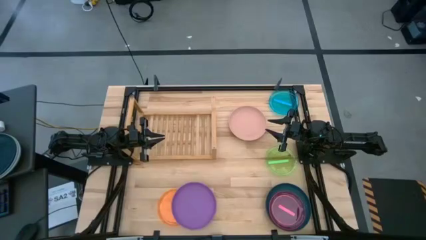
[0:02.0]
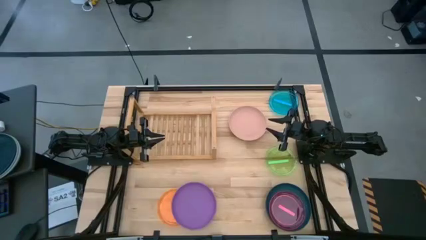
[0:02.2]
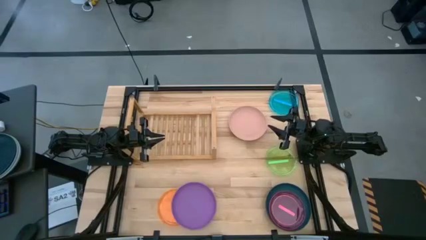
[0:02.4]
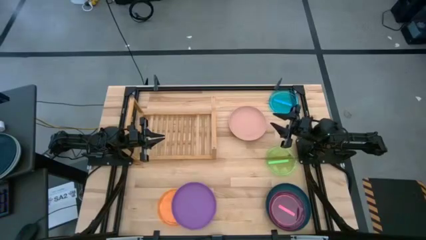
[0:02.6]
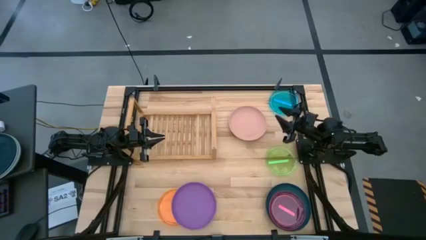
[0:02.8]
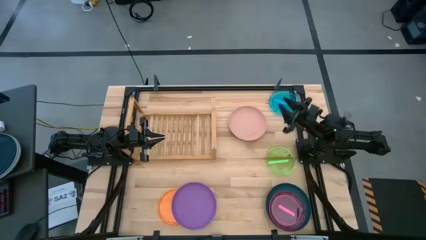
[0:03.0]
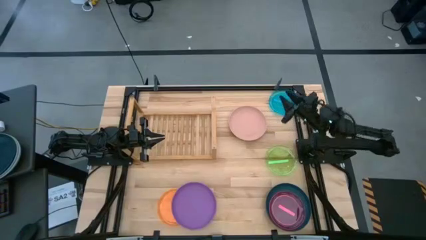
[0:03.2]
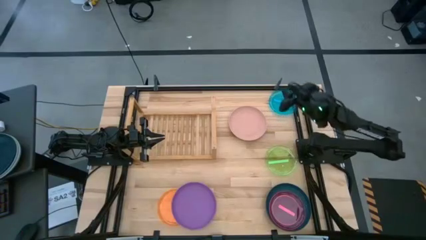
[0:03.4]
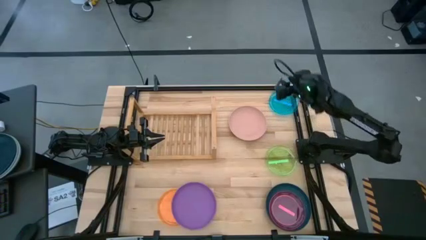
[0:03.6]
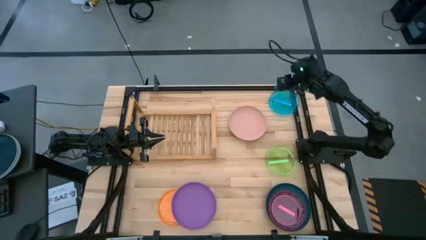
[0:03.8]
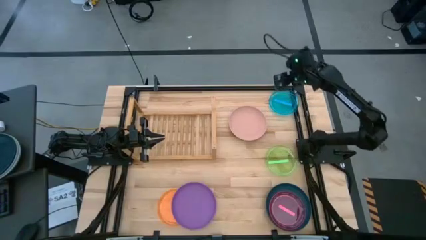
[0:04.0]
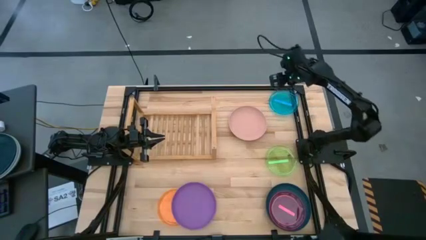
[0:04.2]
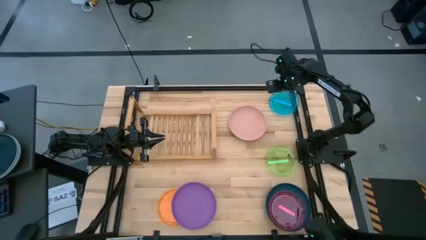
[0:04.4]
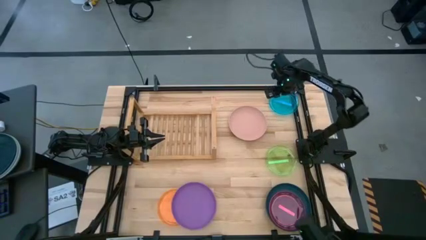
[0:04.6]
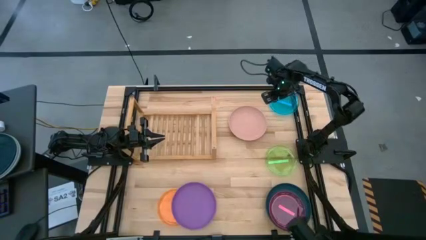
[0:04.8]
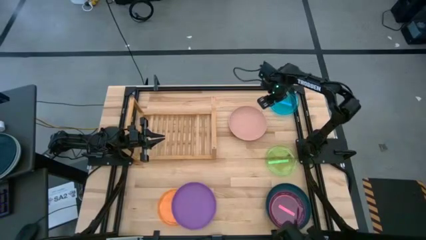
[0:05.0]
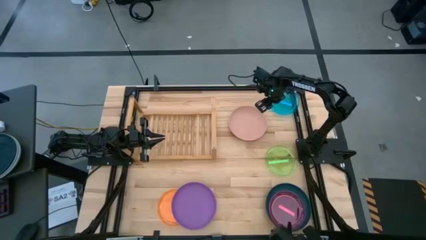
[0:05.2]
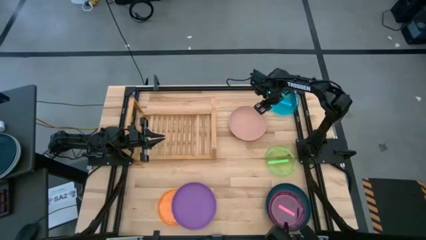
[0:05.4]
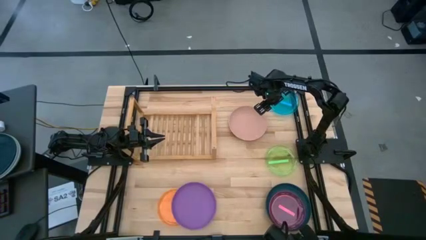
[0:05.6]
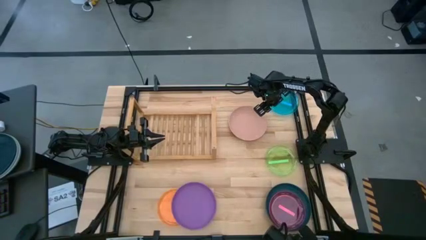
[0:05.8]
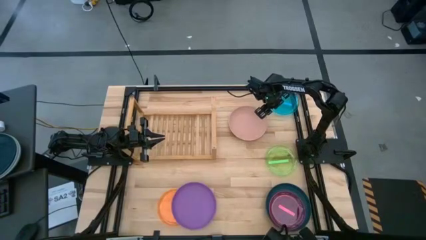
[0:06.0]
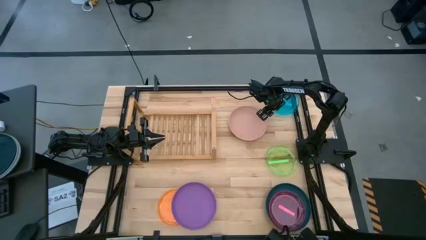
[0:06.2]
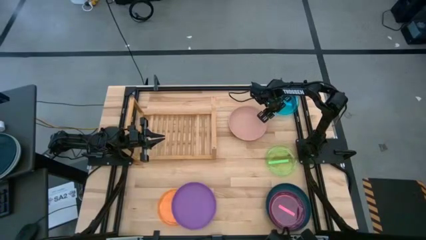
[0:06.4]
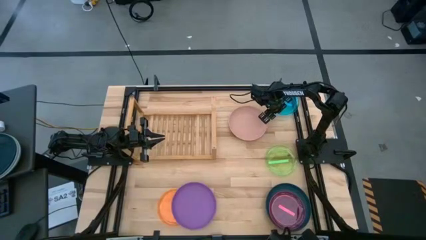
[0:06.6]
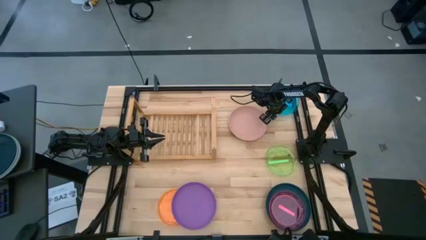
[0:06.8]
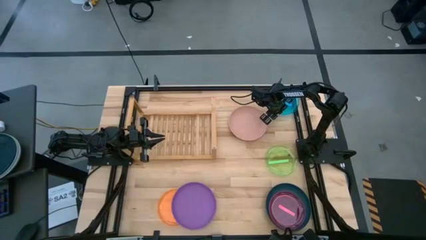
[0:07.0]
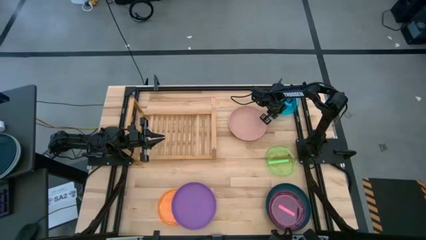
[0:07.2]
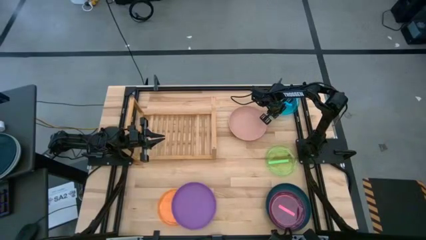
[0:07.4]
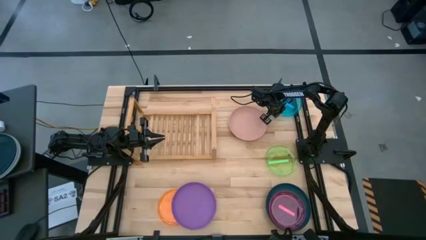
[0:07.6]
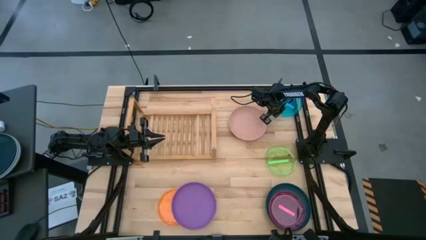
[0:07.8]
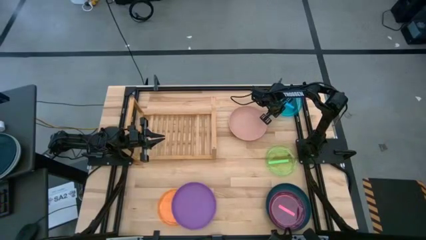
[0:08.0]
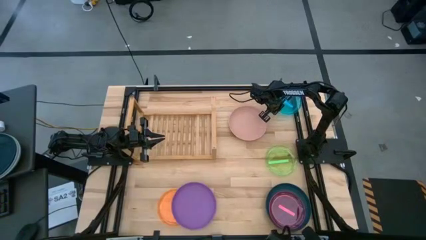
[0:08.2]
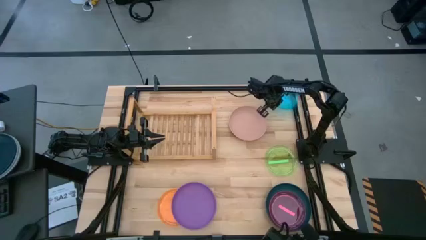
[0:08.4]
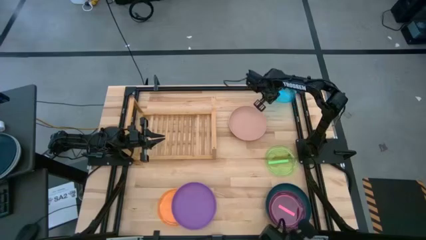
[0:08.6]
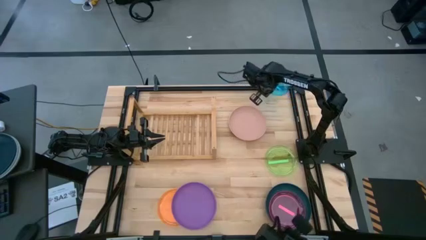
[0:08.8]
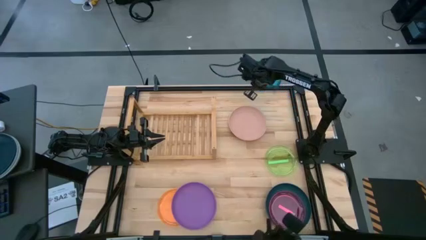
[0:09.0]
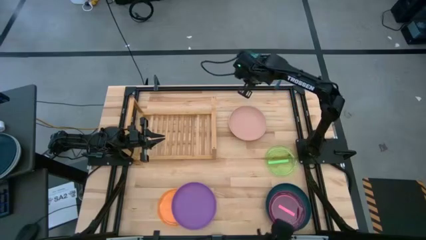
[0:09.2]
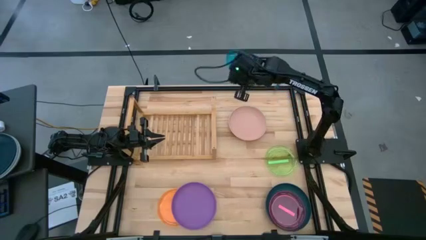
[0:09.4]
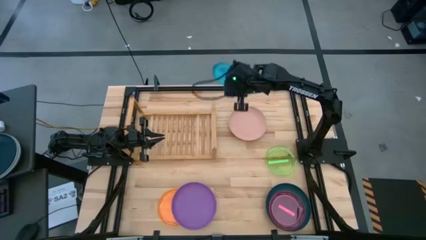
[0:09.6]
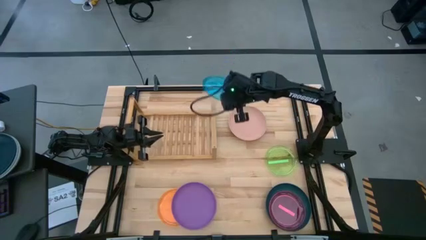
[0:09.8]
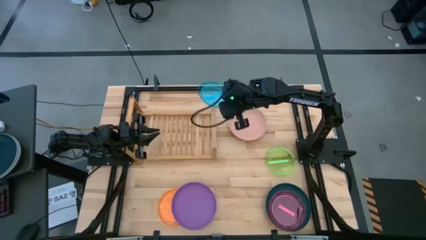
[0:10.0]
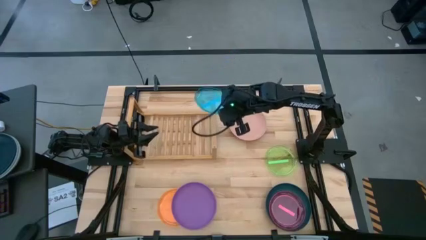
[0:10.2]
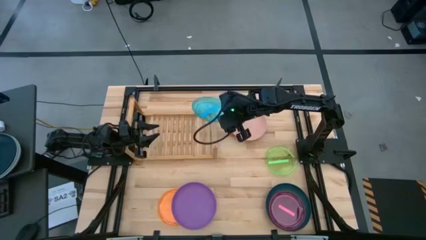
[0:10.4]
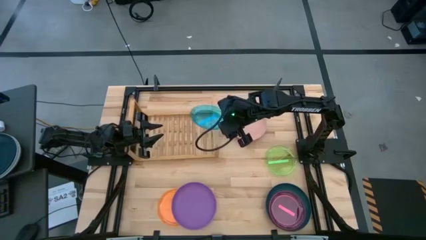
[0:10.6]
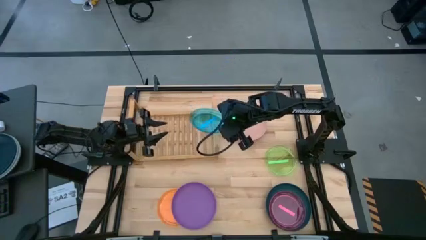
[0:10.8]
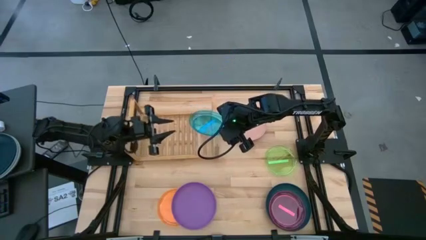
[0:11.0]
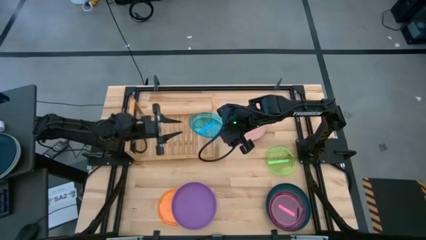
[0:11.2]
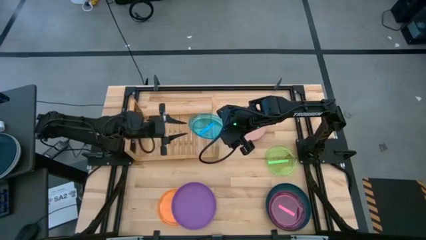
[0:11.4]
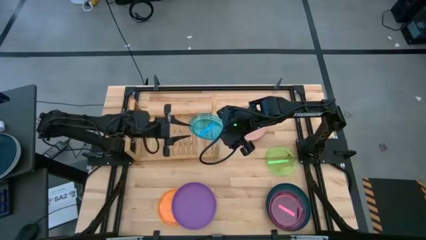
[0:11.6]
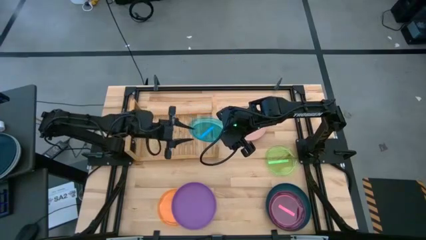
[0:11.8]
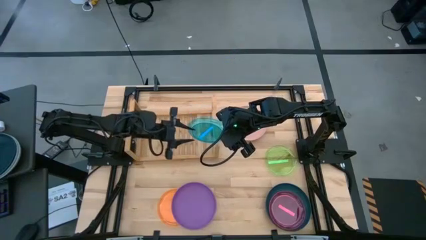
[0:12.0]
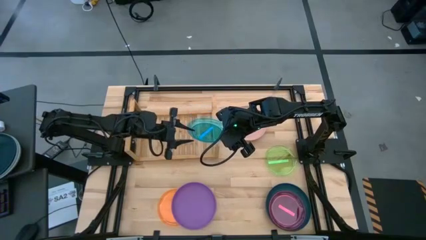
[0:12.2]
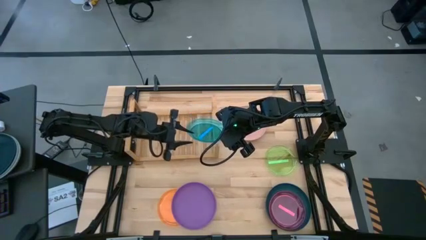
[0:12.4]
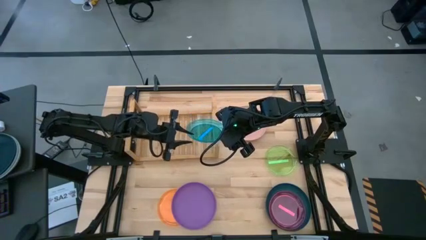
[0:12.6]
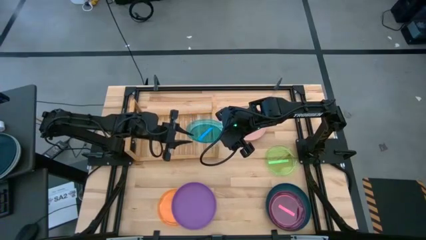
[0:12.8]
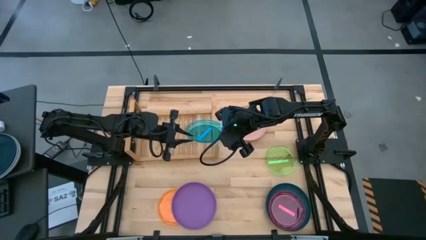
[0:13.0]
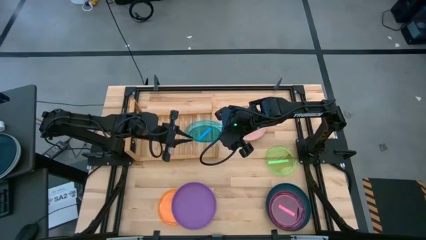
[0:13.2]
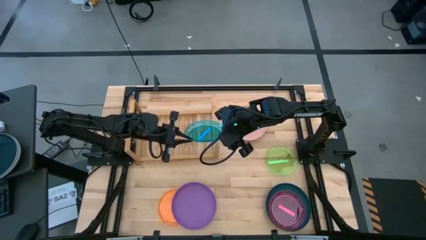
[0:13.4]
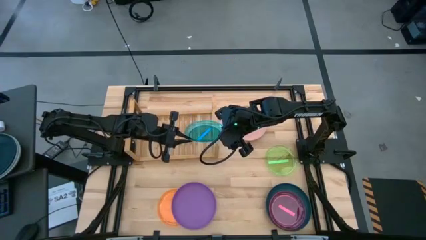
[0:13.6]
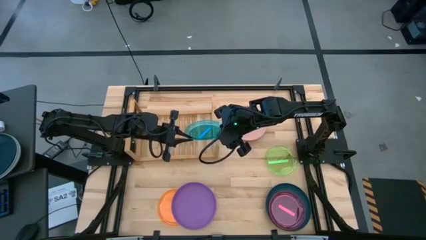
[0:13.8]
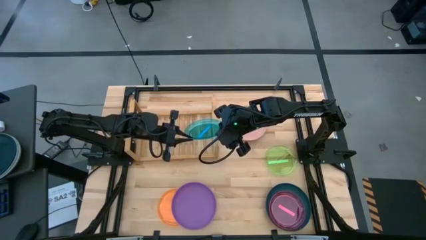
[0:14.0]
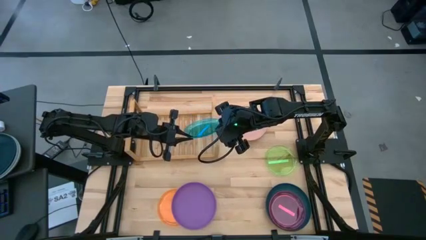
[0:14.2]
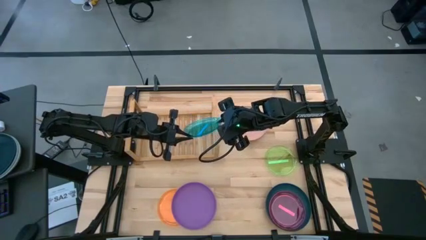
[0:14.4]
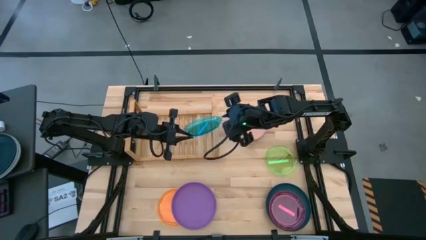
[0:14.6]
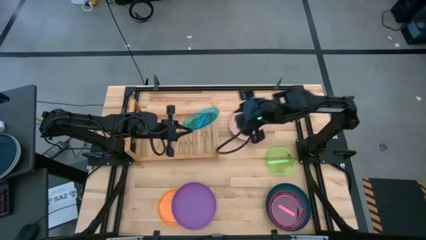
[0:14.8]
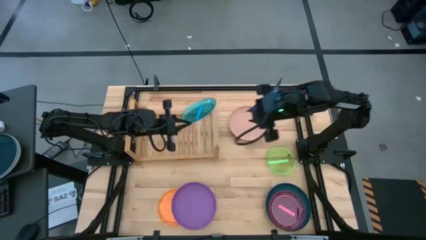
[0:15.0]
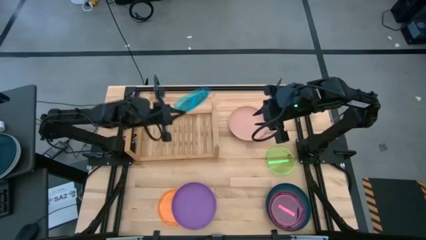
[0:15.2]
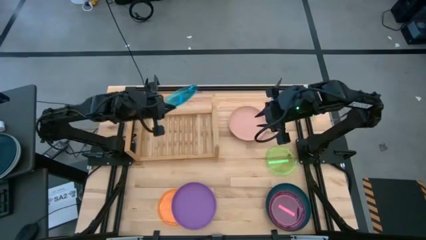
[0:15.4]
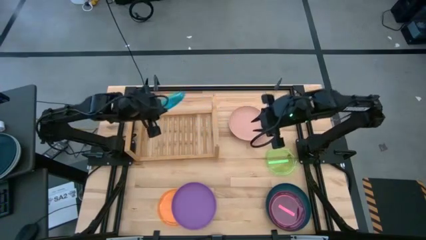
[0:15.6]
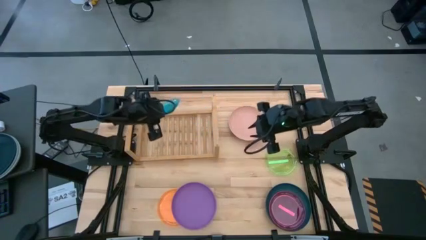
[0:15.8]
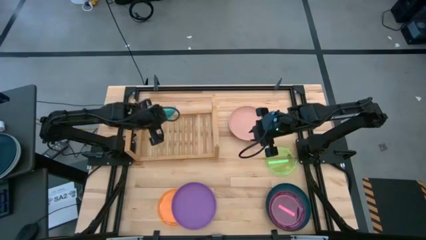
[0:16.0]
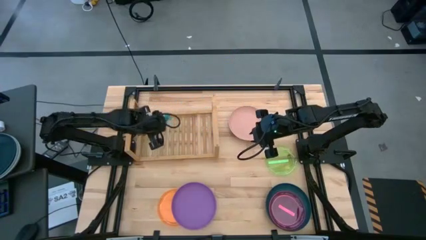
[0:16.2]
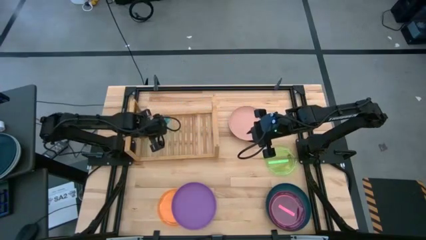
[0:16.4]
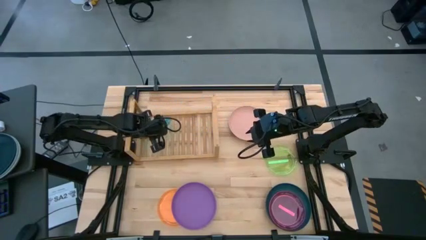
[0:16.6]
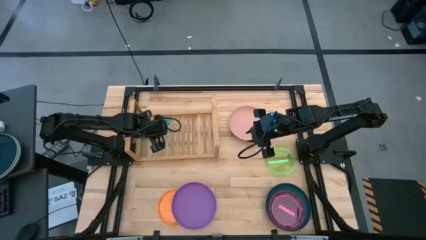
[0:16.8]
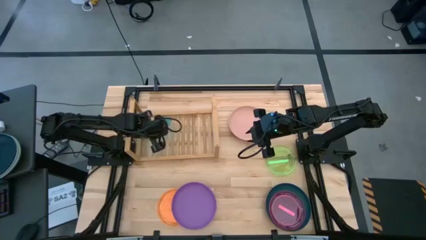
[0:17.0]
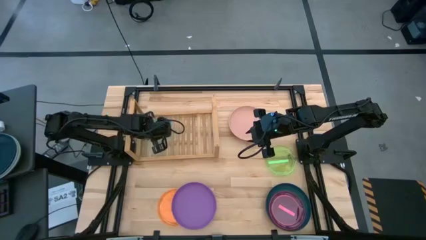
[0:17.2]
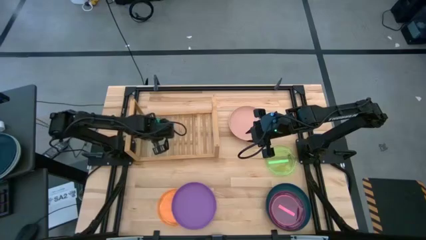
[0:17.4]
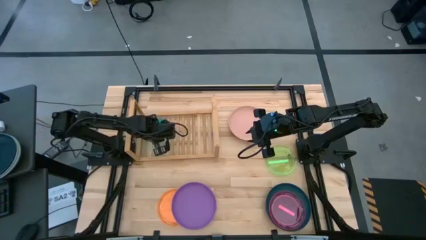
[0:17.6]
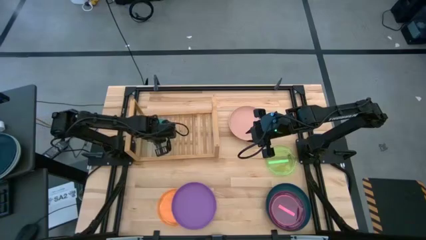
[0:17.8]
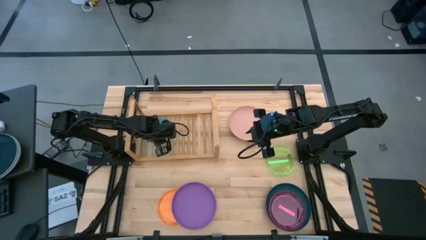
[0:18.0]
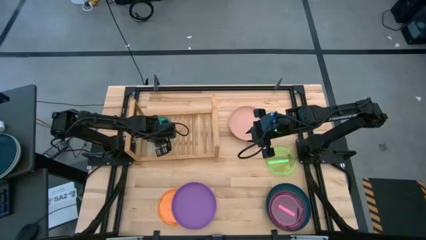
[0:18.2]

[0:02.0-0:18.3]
Task: Place and stack plates onto a shelf
Put the blue plate on the shelf
